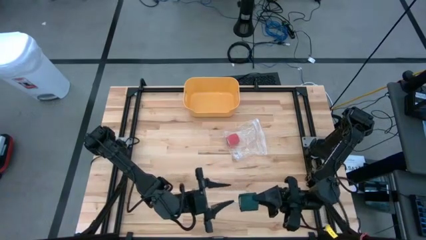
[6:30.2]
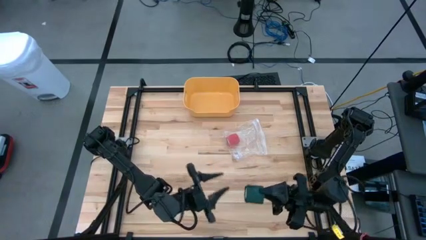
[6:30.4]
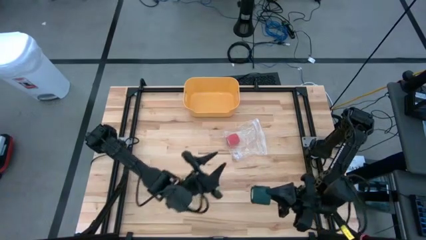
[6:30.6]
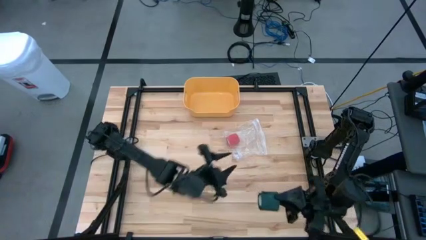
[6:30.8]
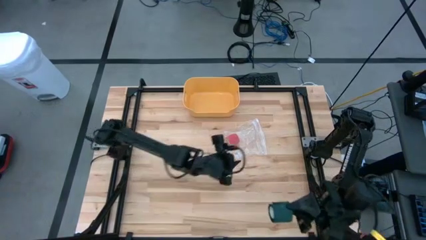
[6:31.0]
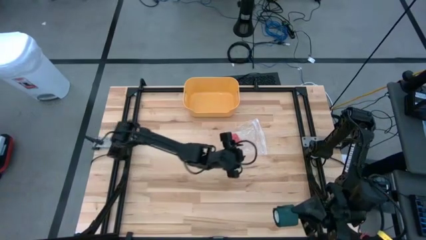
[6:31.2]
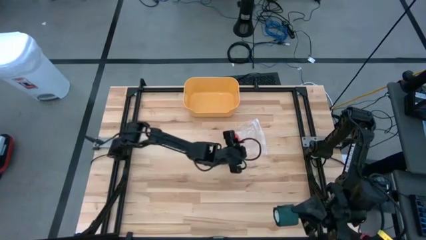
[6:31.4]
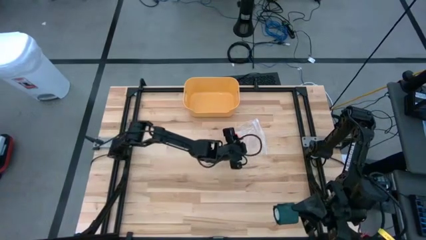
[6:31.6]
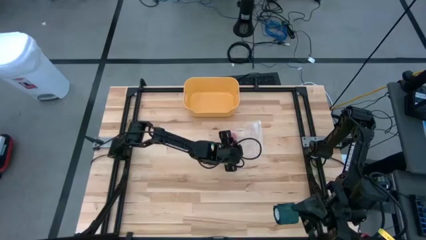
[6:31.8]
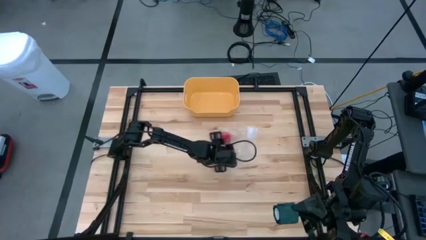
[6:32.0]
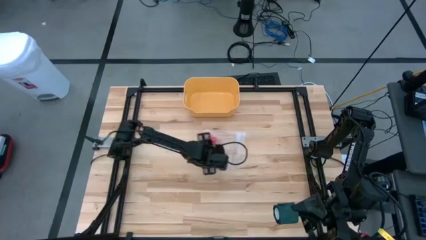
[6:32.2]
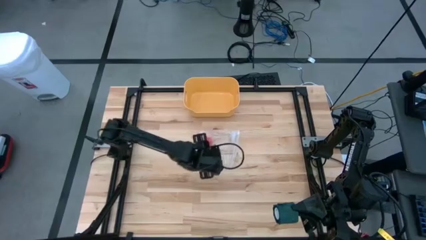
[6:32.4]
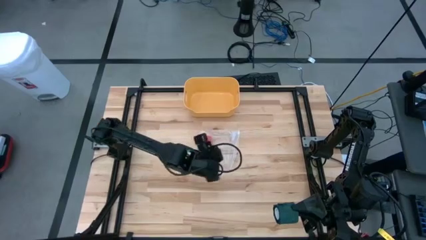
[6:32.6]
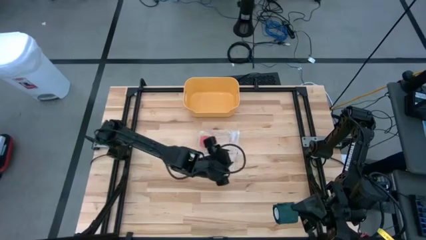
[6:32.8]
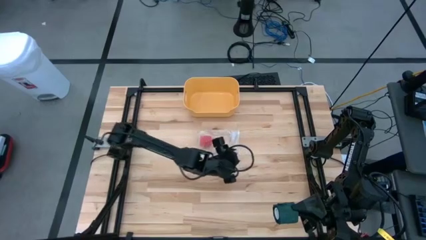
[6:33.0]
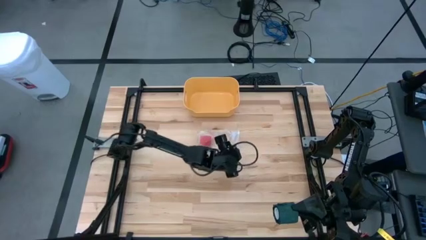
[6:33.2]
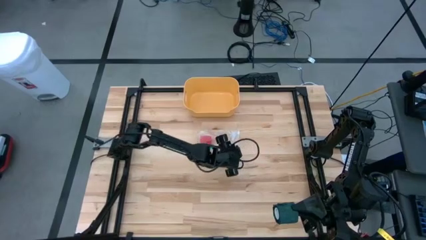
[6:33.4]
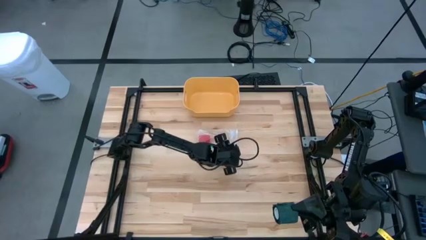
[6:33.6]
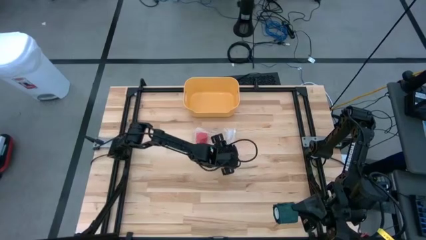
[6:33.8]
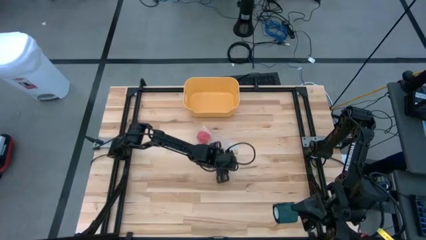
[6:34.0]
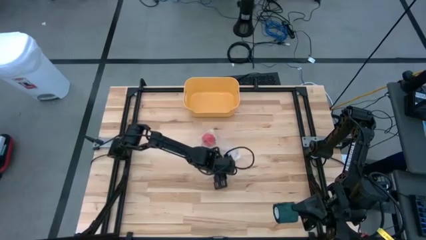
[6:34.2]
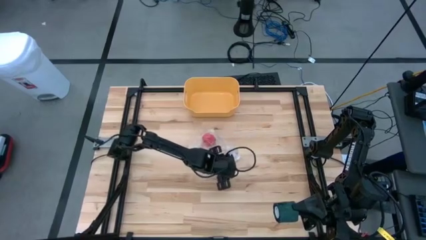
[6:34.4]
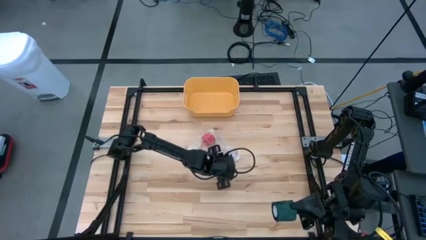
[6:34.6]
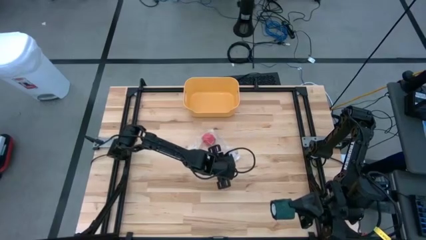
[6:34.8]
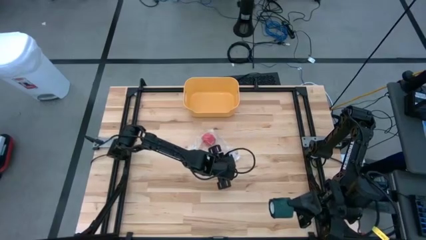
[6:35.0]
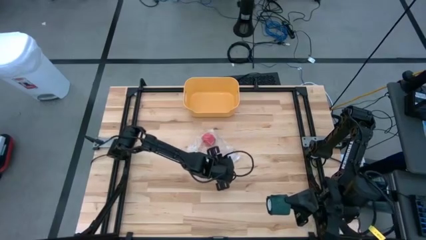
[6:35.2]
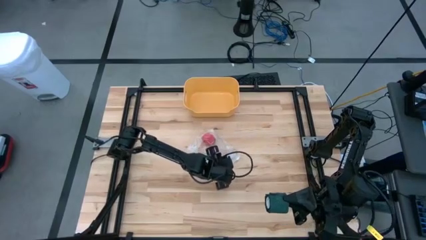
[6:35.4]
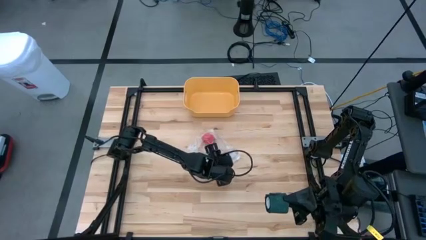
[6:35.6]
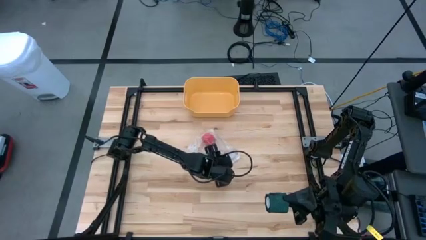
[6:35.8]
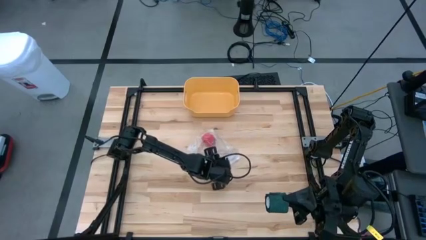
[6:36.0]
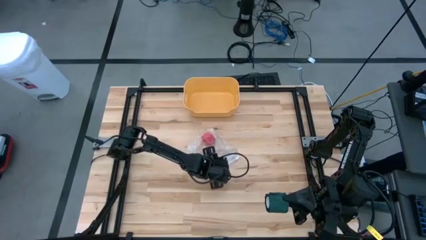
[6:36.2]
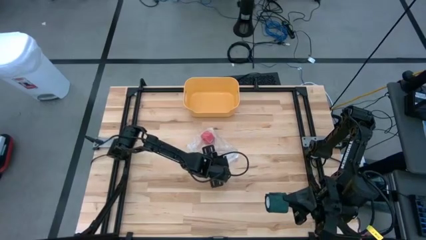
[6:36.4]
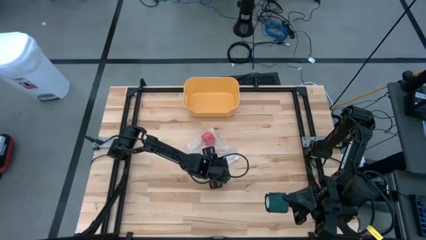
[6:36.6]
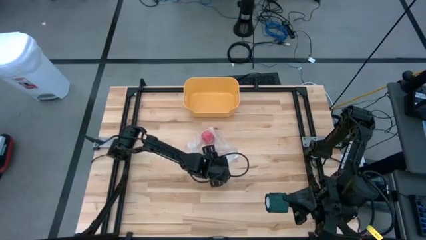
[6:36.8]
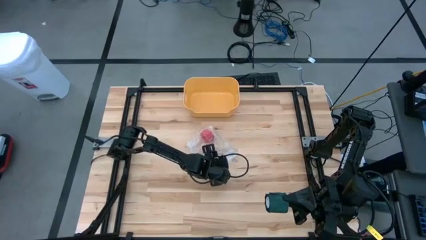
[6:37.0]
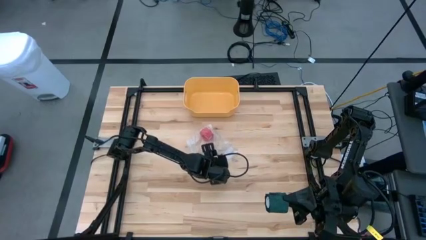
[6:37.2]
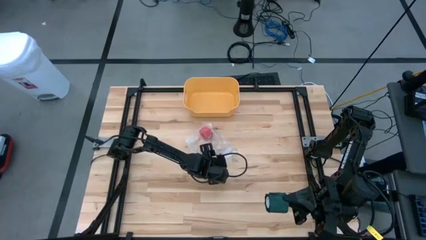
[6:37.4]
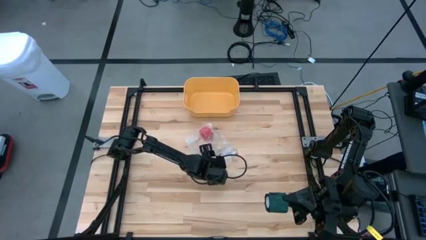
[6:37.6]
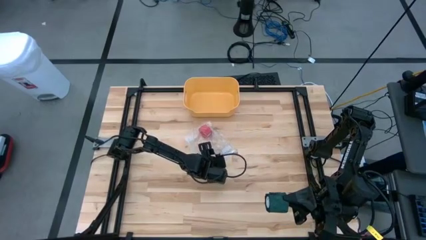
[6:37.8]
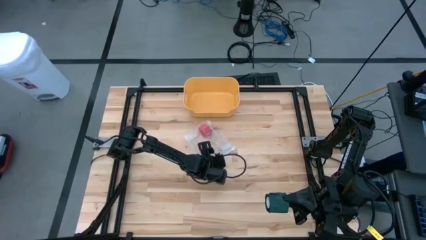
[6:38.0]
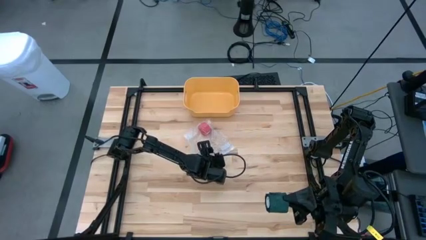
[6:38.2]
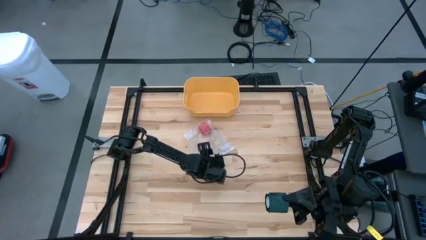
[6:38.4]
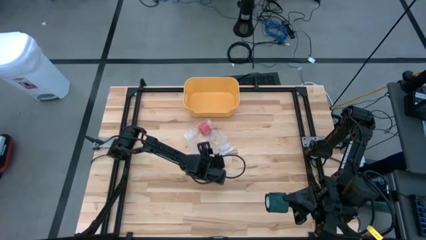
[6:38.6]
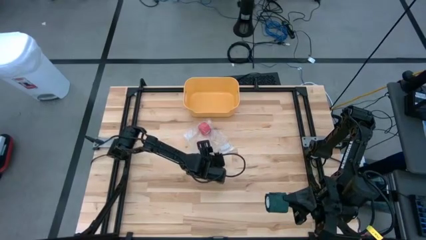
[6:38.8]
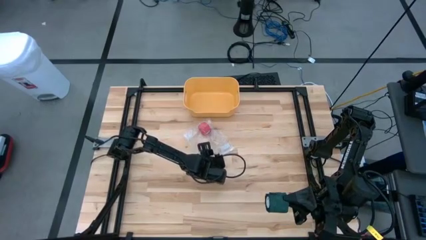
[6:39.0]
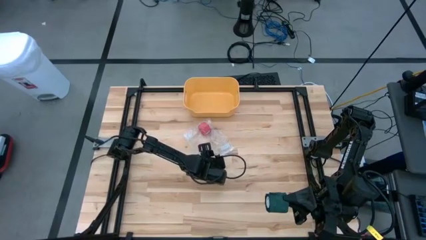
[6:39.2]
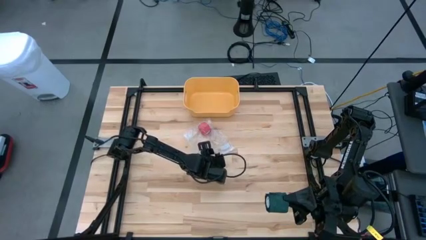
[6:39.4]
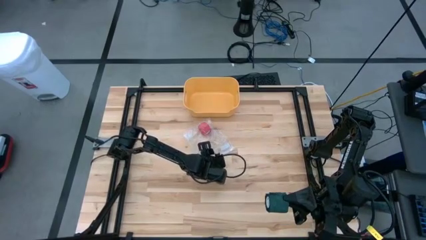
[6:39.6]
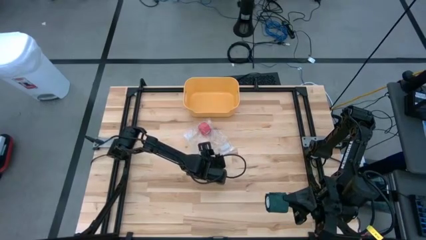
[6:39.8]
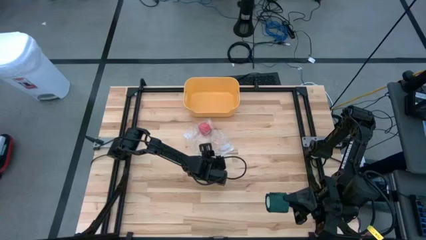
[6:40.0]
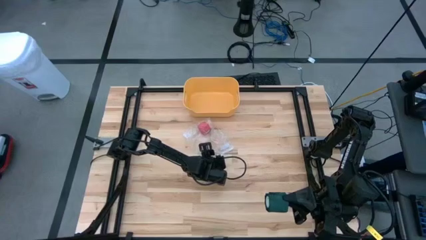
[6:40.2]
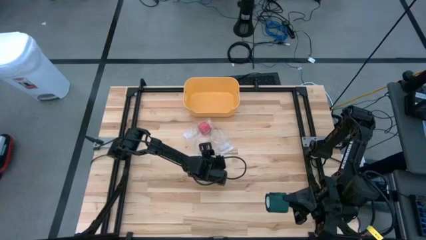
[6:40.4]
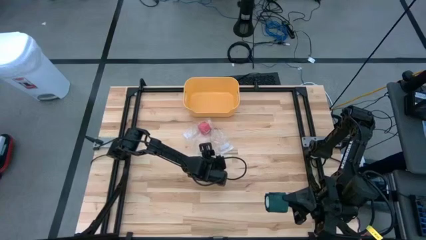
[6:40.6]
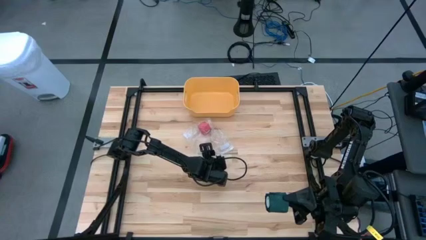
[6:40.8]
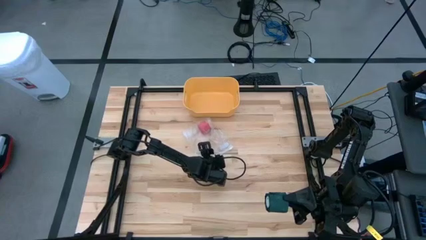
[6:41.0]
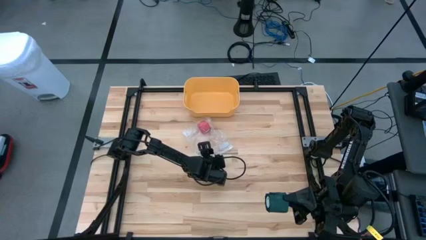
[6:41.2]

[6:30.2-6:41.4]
Task: Roll bandage
Put the rolled green bandage into the transparent zip bag

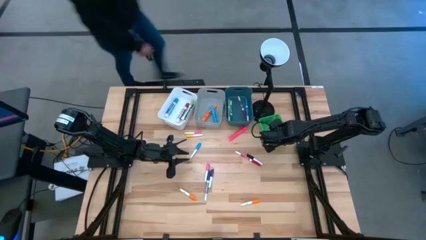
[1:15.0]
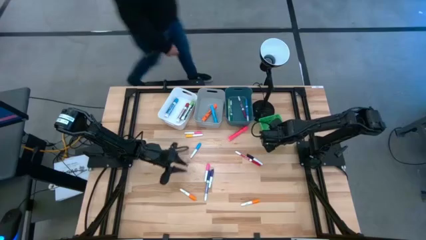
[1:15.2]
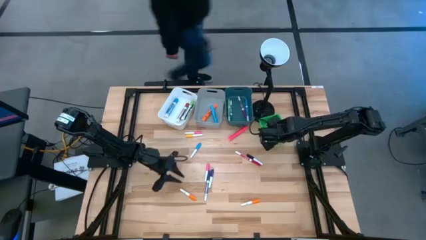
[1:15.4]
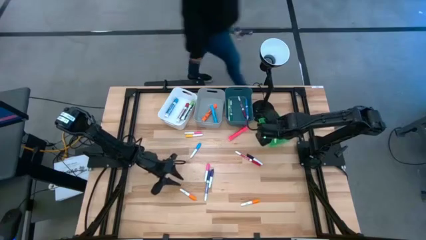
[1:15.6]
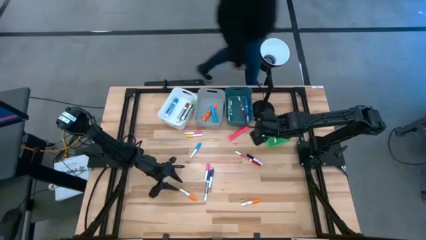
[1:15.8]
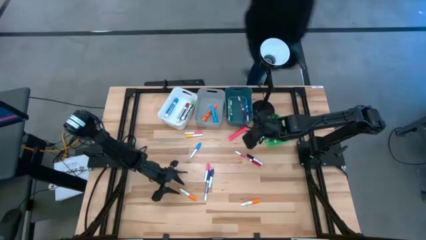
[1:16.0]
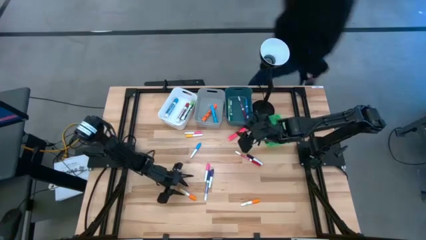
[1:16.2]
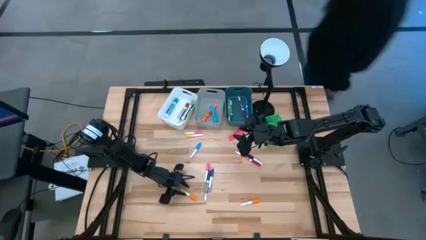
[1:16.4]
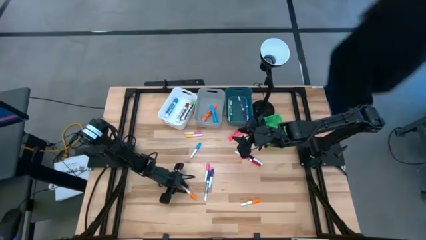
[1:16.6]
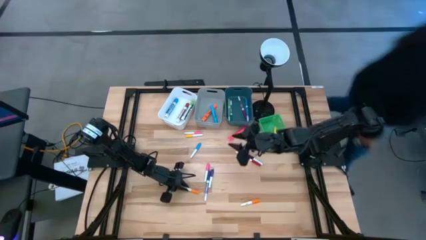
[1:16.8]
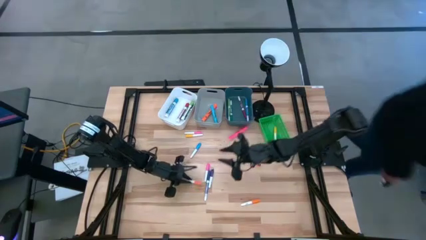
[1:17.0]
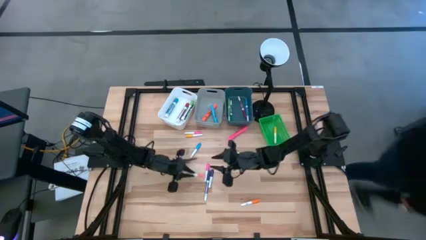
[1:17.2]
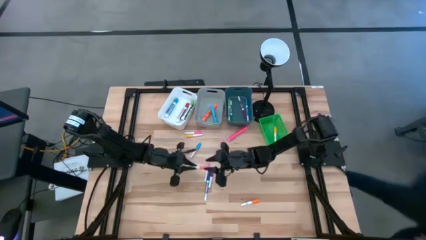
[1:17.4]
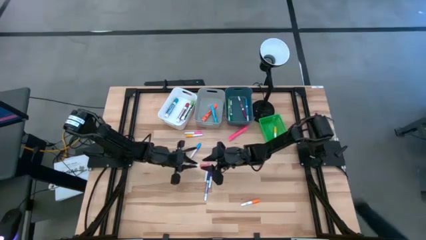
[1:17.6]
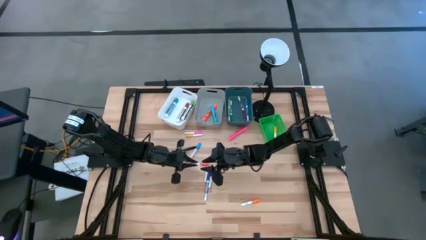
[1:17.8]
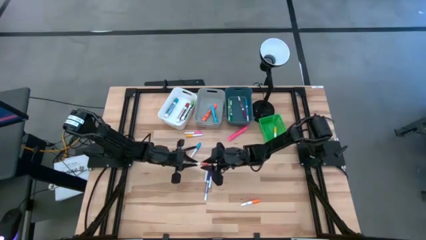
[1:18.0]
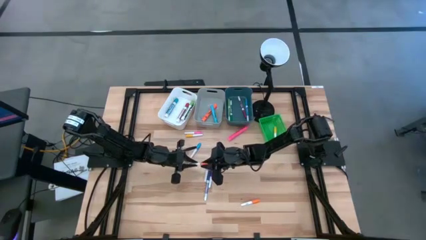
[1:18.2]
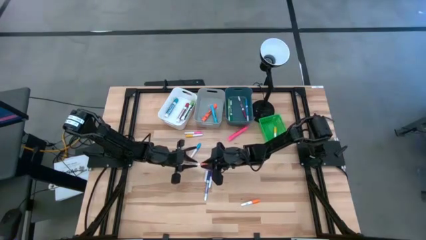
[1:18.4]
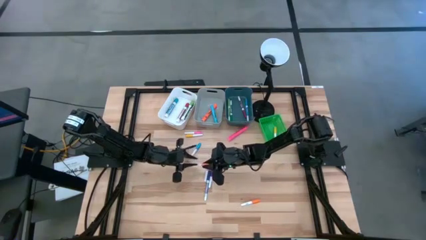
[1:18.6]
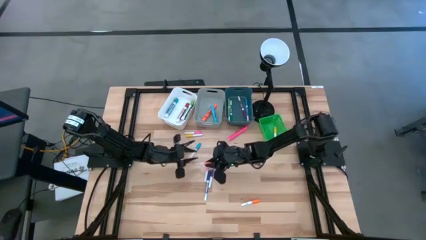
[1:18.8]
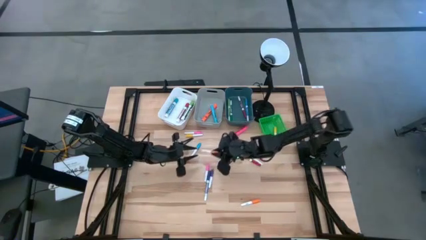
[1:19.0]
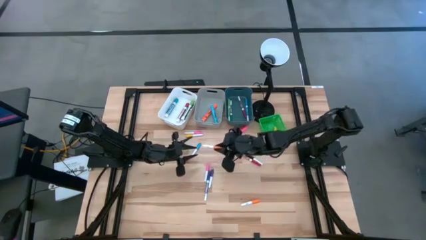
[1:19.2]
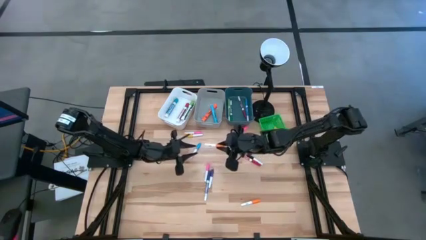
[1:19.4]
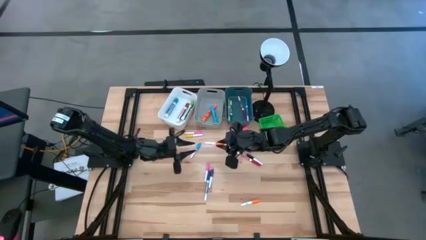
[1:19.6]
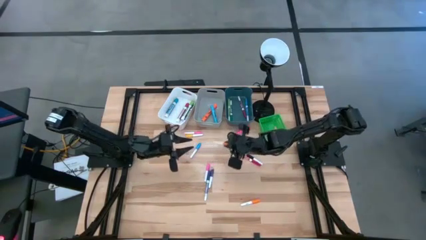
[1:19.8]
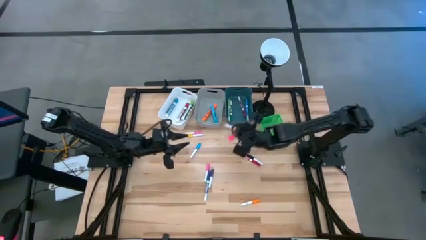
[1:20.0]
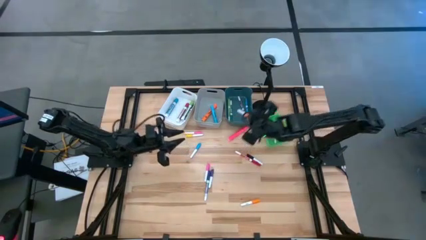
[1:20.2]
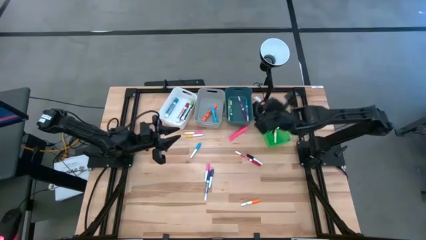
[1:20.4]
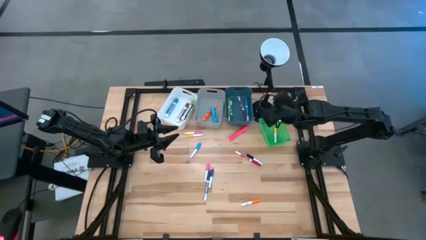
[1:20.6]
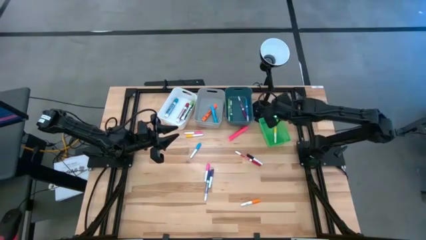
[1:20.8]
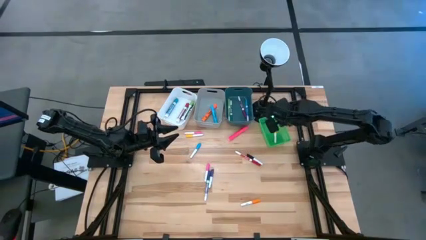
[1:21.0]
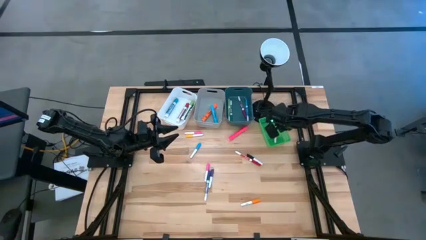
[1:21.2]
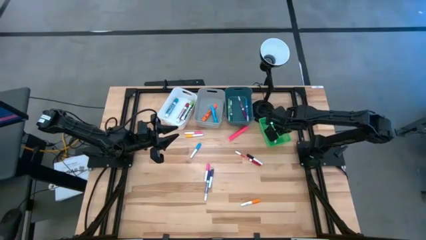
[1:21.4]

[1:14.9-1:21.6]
Task: Pick & Place Markers
Put the orange highlighter pen into the green bin
